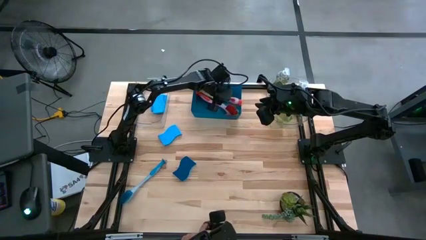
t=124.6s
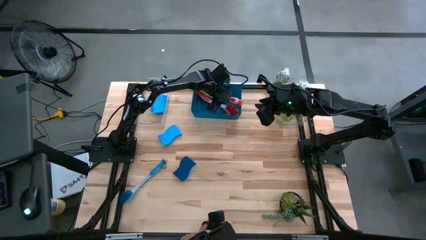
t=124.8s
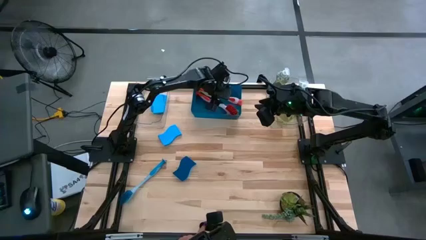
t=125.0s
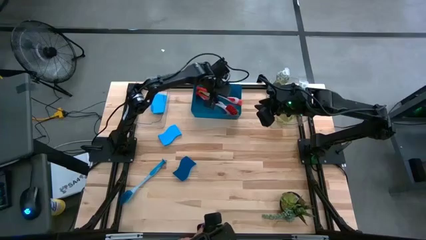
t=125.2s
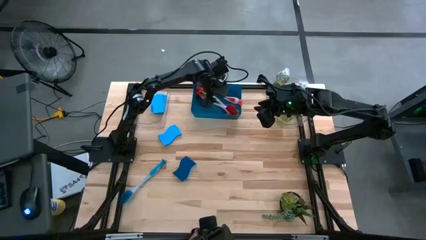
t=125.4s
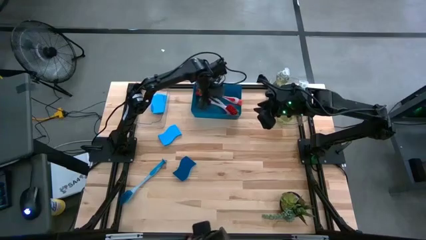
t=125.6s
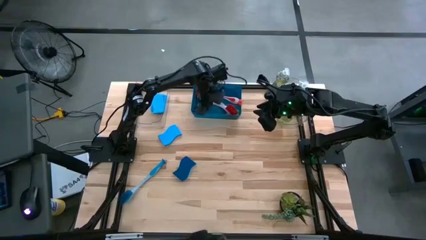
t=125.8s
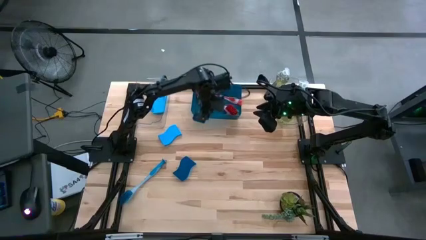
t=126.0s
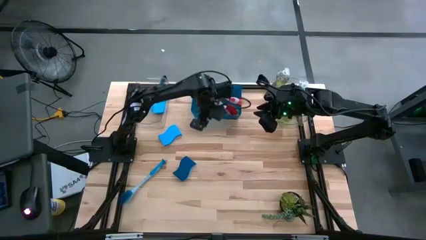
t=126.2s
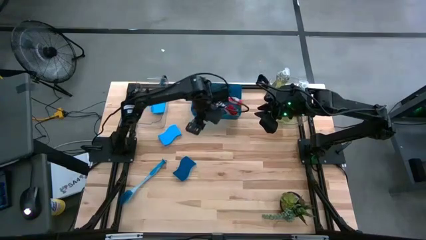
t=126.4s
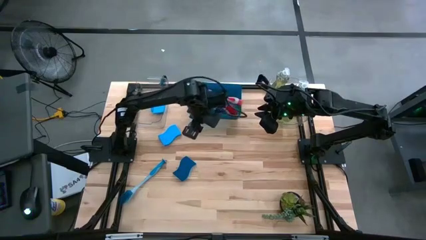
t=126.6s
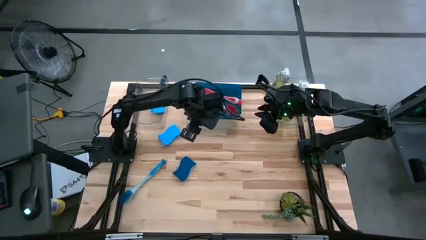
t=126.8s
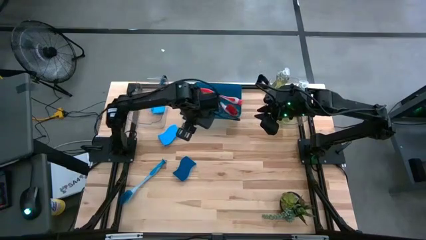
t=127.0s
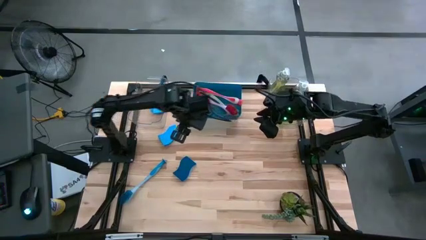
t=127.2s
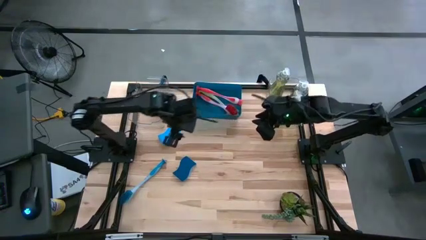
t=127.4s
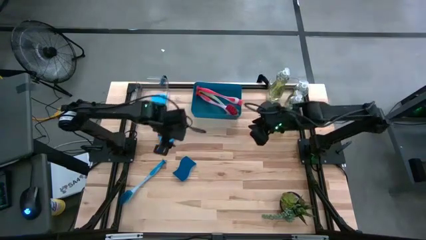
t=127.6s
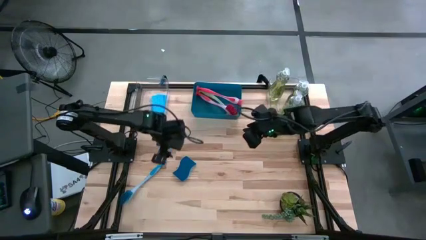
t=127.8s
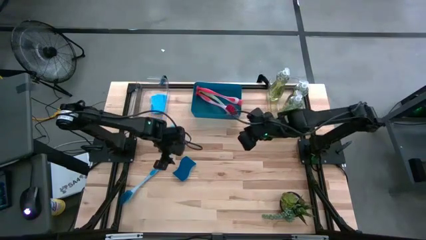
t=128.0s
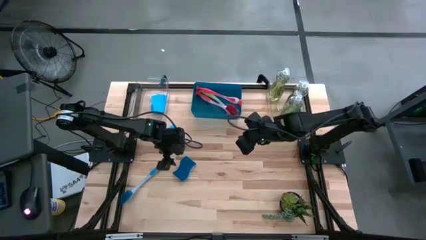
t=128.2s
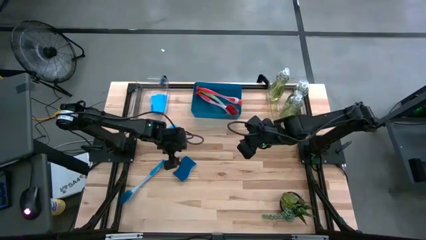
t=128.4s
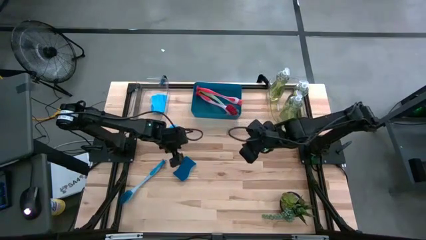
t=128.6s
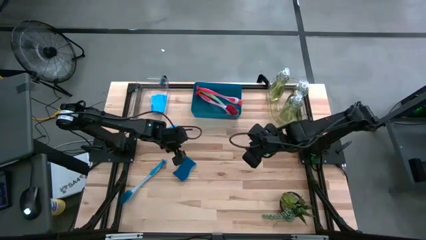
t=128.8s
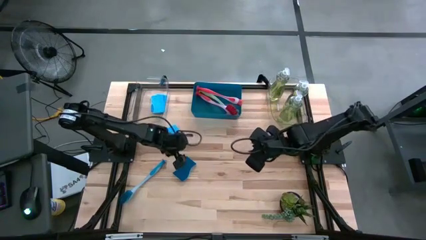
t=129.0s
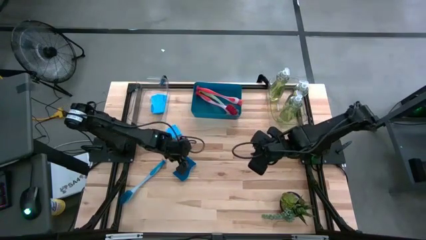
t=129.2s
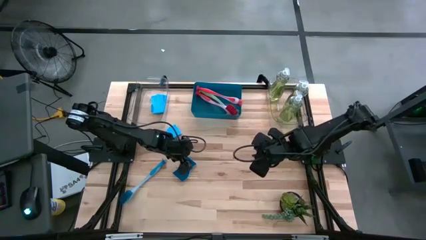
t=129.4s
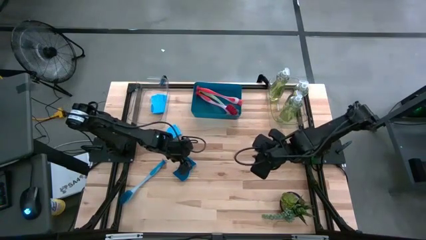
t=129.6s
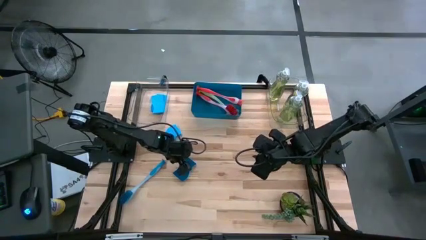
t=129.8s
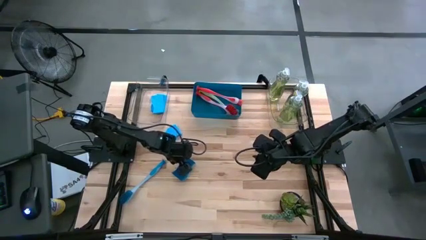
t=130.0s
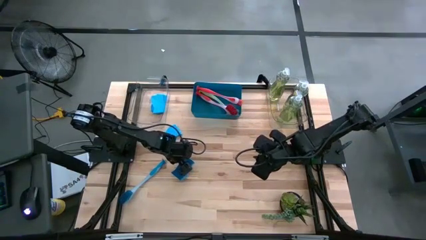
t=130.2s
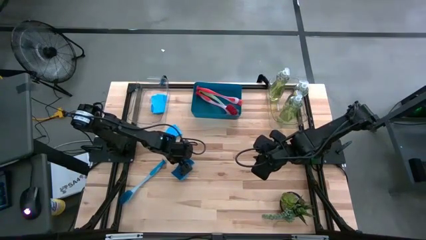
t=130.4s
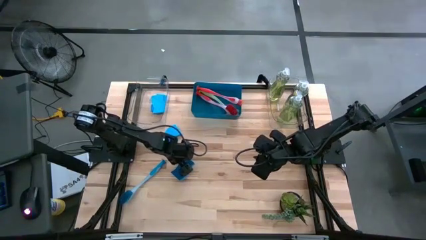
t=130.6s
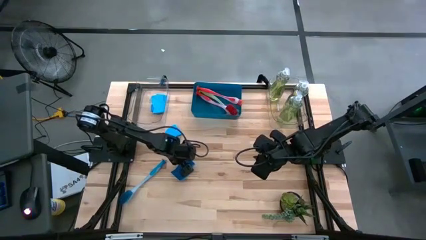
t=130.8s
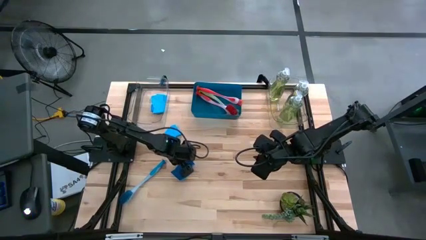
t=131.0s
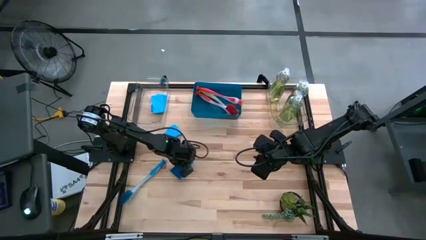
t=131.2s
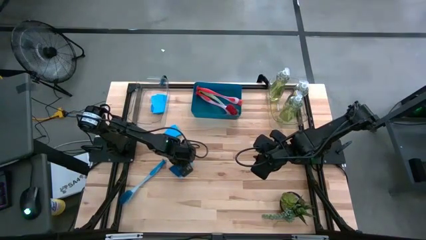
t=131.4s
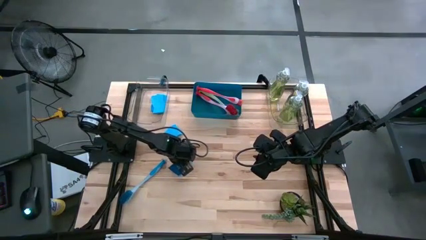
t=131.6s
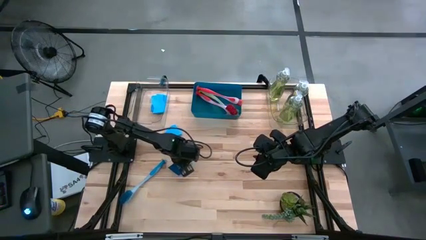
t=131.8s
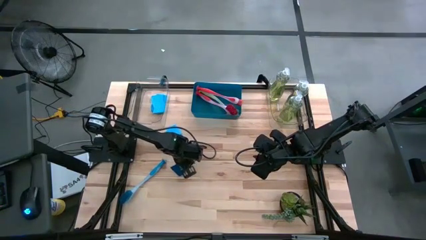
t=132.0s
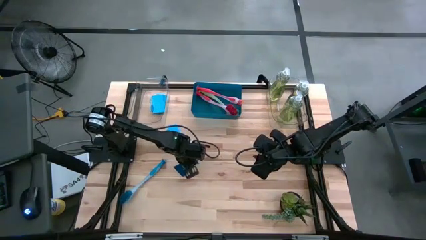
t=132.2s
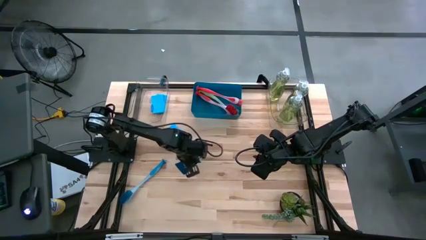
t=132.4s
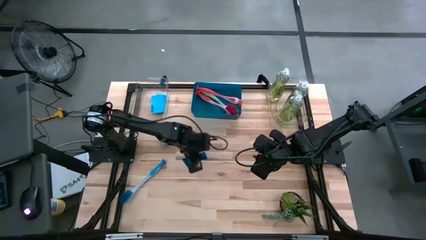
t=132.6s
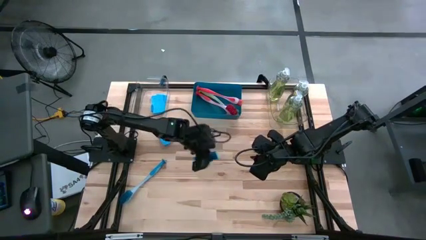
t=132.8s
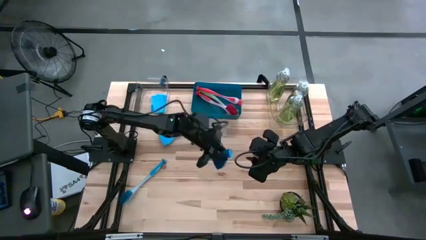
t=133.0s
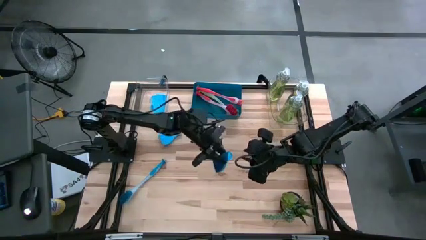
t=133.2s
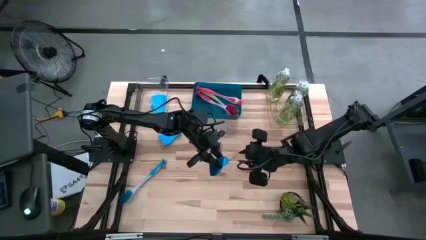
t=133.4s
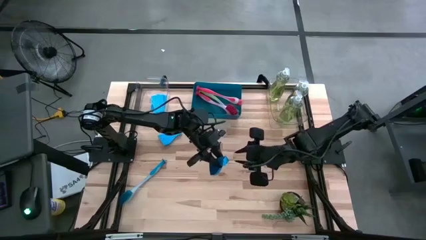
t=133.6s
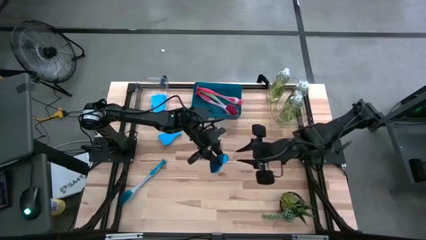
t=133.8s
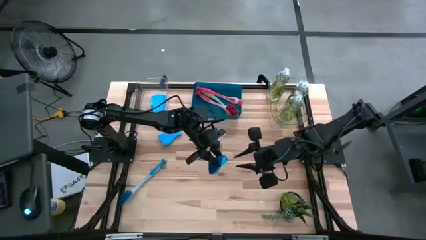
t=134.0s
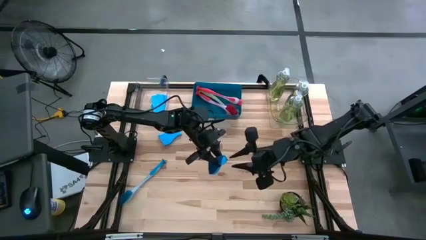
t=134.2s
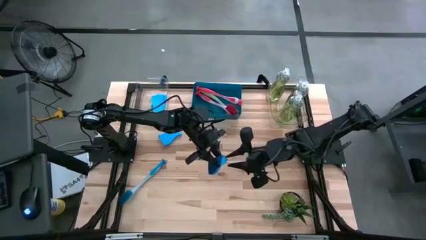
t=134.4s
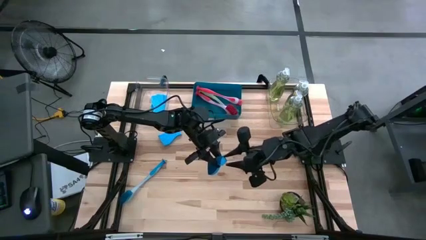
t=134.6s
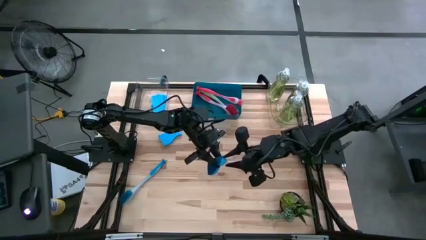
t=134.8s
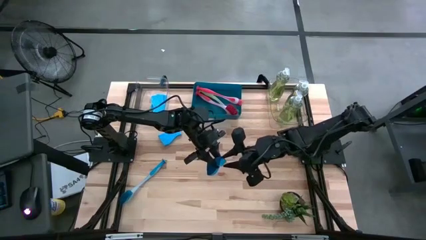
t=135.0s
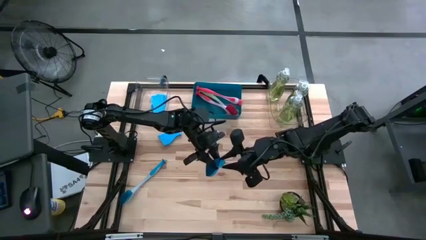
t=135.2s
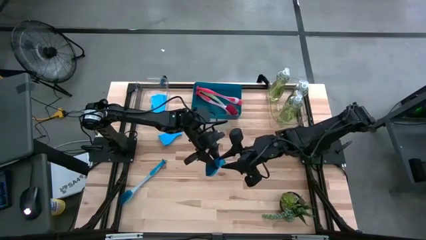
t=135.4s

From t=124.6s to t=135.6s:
Task: Pick & Place Kitchen Sink Supplies
Put the bottom blue sponge into the left transparent bin

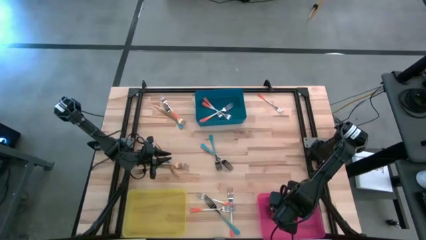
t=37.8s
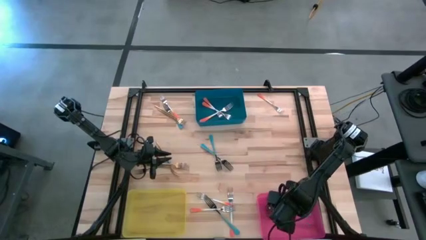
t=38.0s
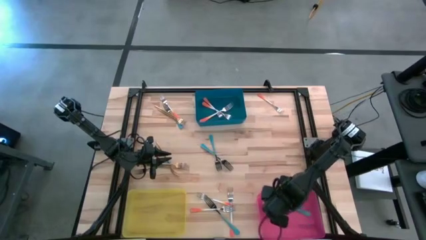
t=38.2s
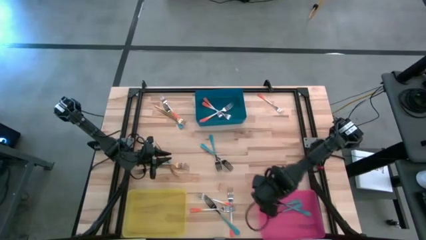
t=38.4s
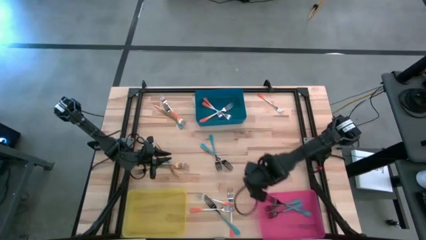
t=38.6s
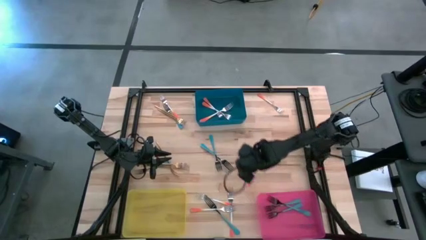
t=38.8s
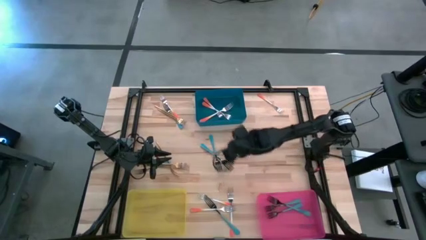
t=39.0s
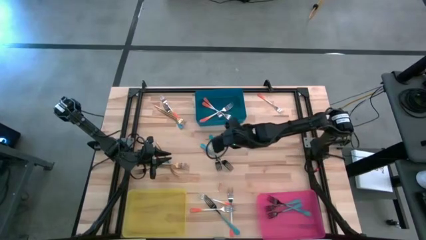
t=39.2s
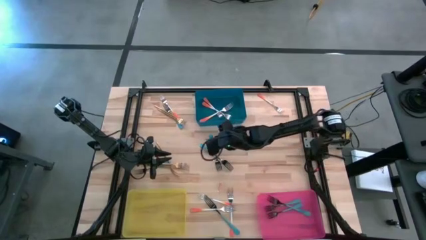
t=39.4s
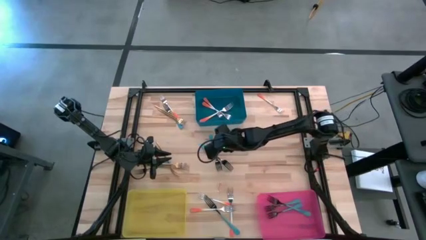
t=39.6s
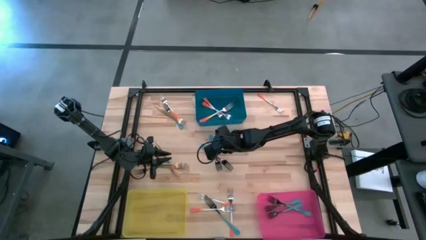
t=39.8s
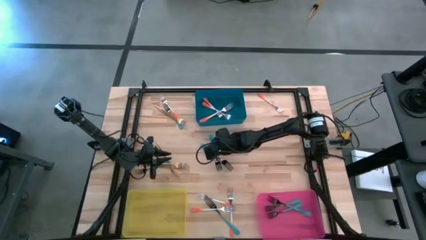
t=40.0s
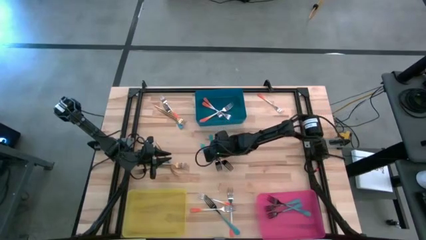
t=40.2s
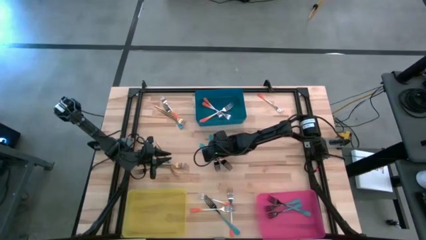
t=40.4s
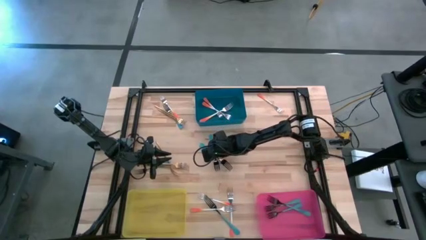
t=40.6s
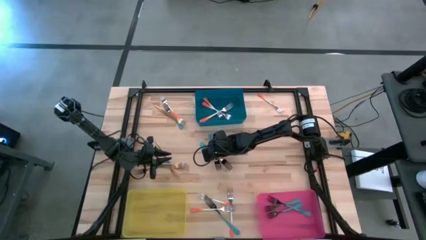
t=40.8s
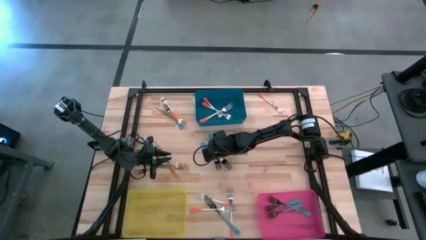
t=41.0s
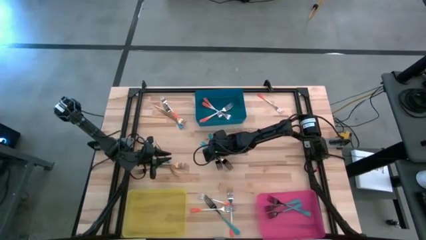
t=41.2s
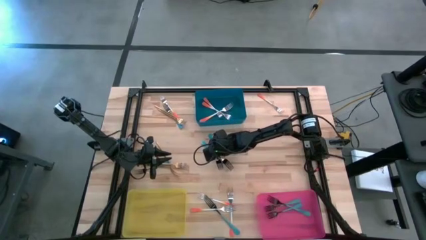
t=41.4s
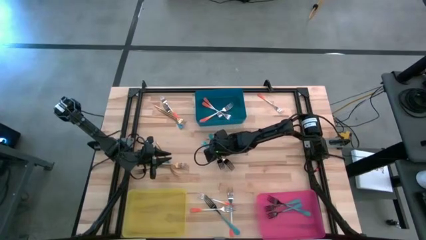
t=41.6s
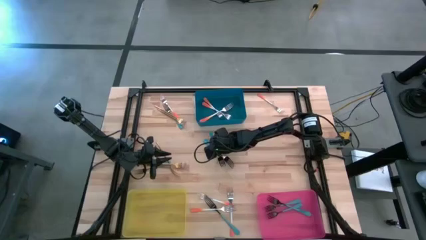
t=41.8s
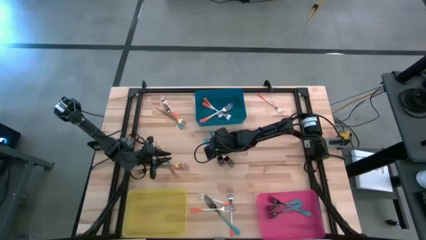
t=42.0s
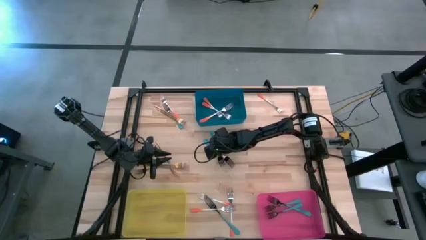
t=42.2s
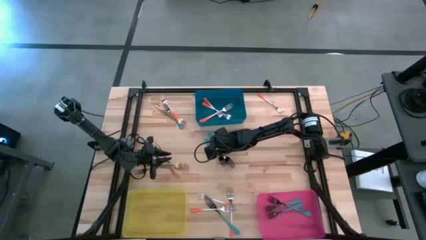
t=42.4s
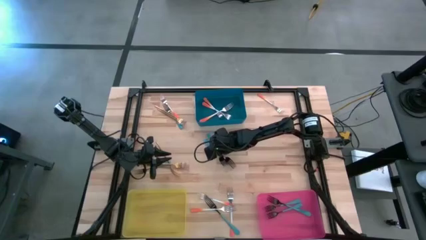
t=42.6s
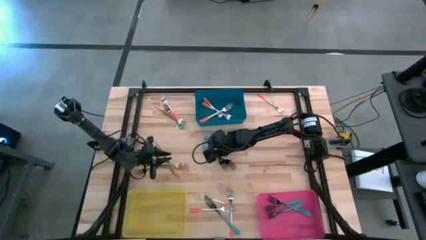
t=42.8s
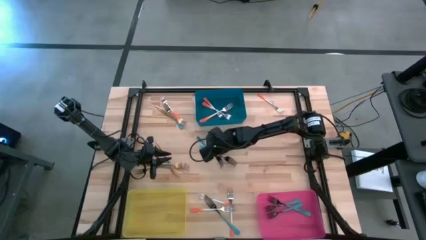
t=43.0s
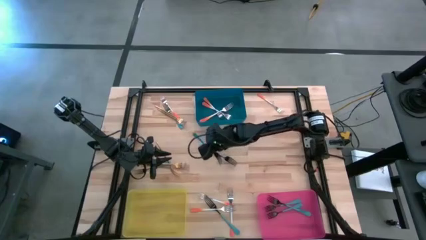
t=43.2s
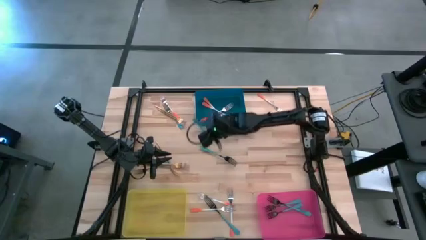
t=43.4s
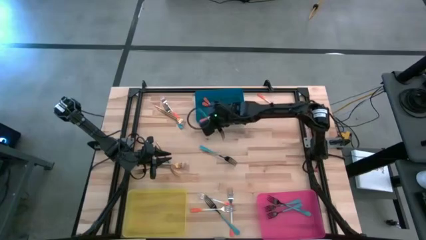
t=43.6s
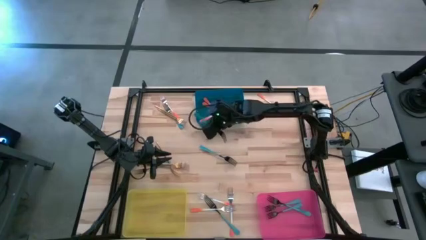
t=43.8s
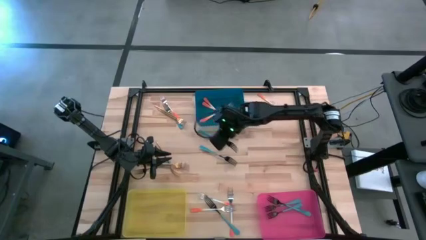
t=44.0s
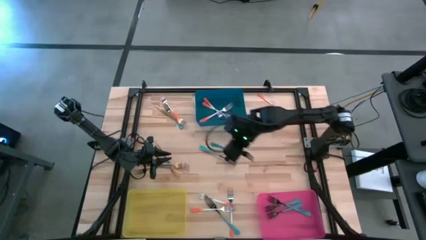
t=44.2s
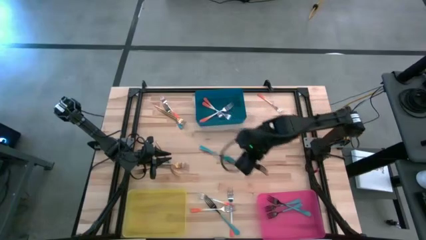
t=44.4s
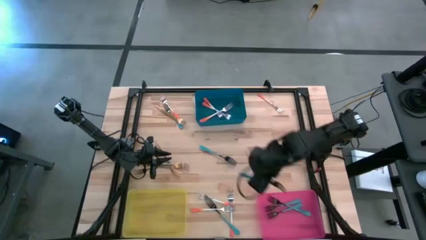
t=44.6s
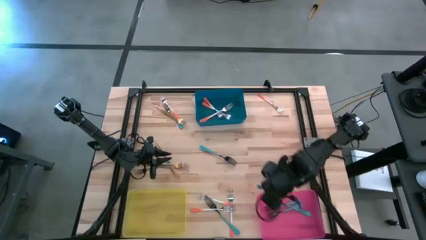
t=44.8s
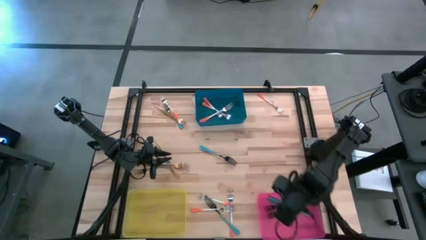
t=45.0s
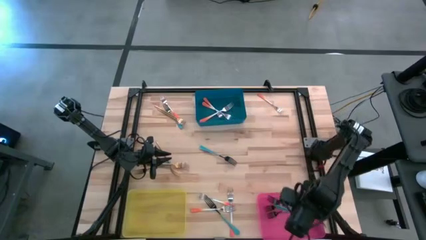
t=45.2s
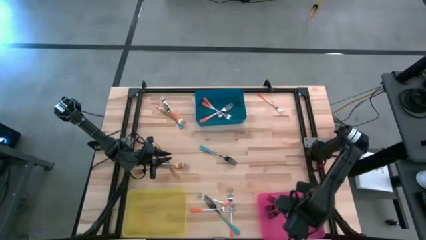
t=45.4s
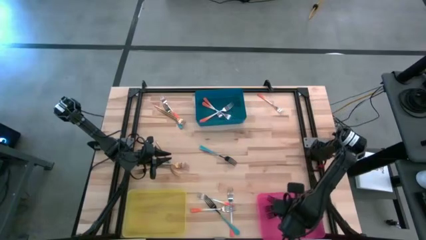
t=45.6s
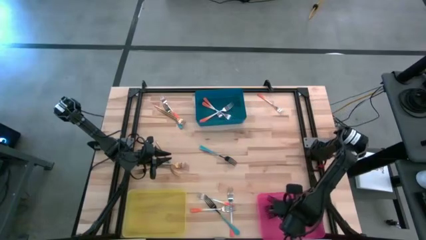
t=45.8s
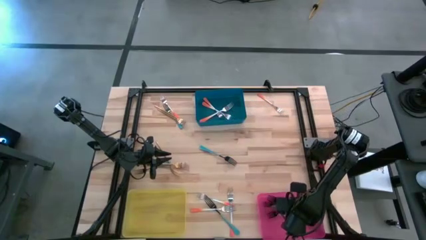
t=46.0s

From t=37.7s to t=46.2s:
Task: Sort silverware by color (type)
Put the blue fork into the pink bin
